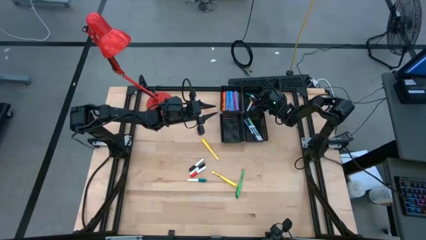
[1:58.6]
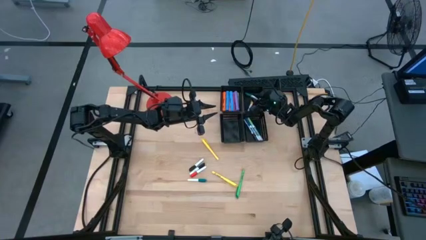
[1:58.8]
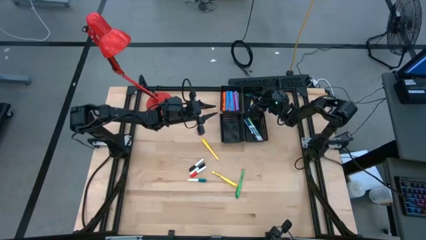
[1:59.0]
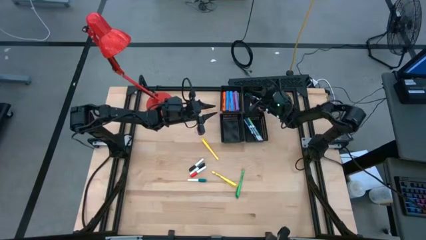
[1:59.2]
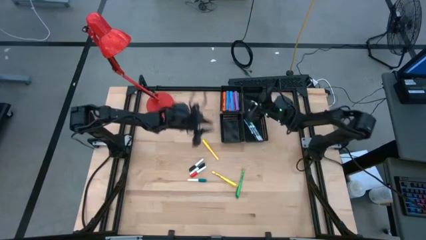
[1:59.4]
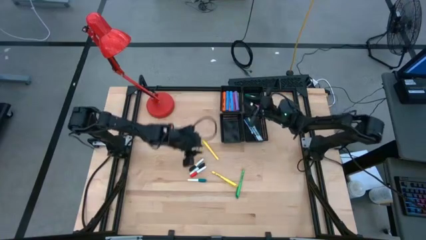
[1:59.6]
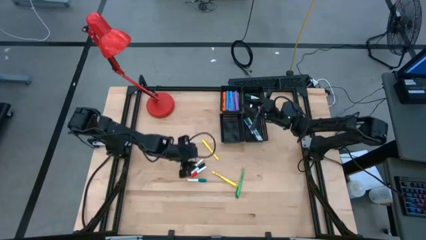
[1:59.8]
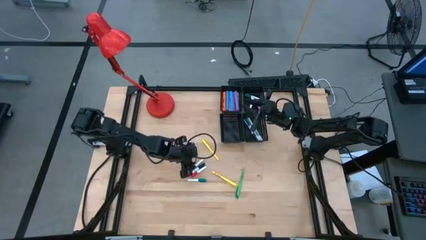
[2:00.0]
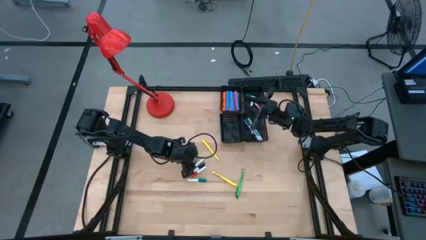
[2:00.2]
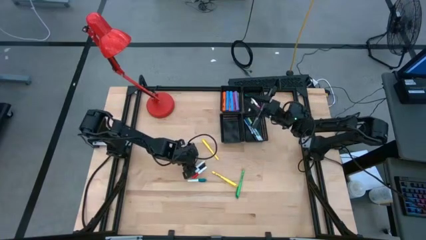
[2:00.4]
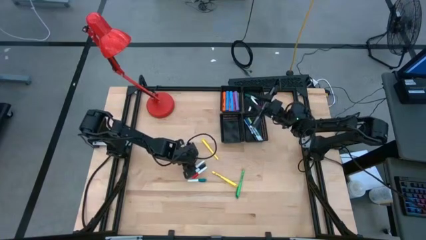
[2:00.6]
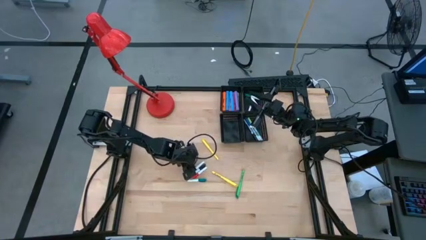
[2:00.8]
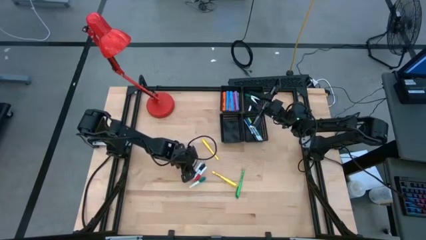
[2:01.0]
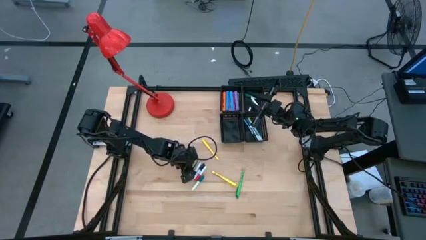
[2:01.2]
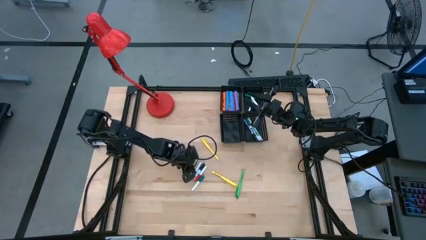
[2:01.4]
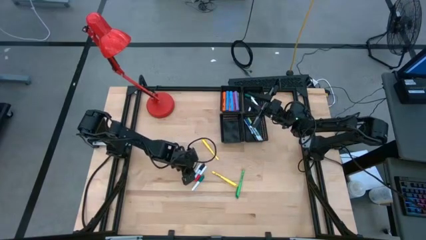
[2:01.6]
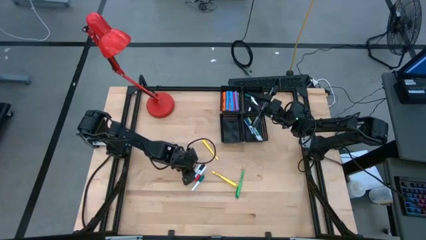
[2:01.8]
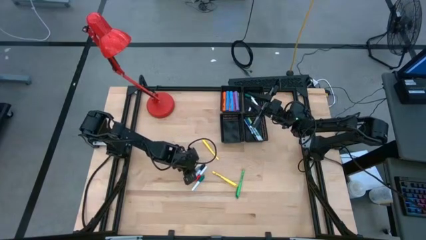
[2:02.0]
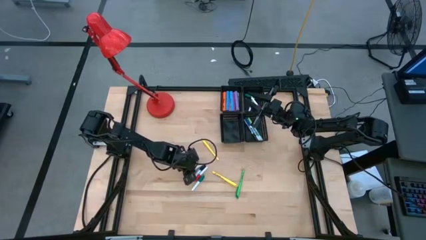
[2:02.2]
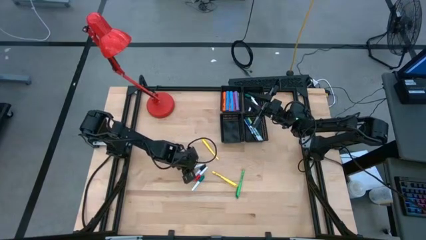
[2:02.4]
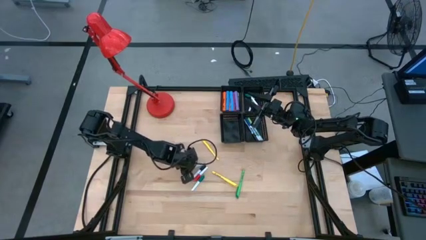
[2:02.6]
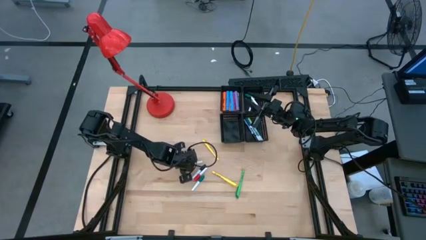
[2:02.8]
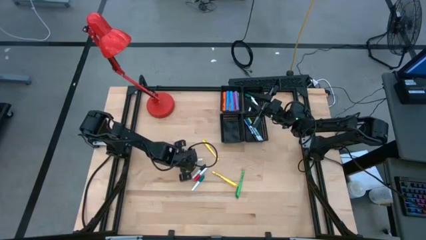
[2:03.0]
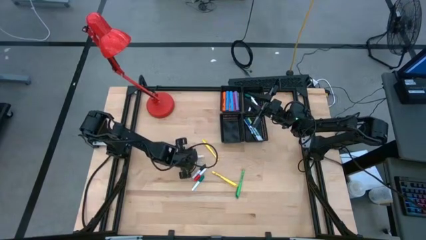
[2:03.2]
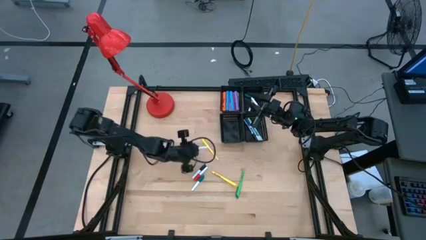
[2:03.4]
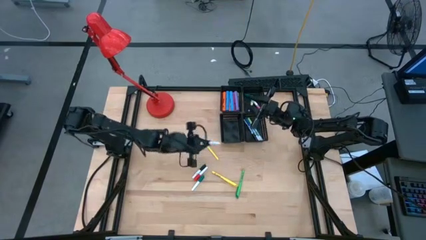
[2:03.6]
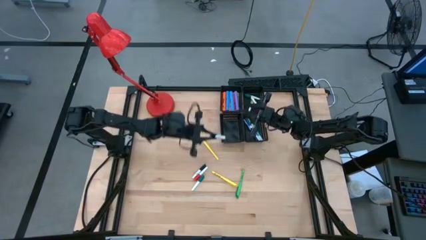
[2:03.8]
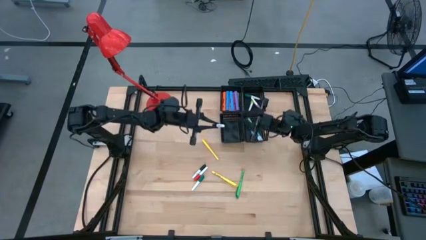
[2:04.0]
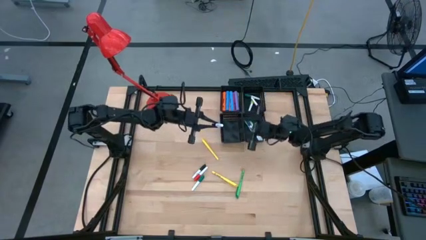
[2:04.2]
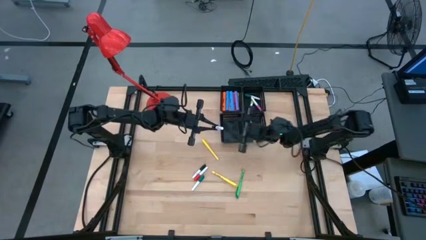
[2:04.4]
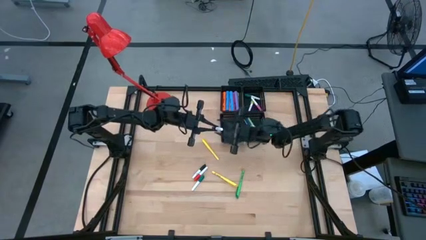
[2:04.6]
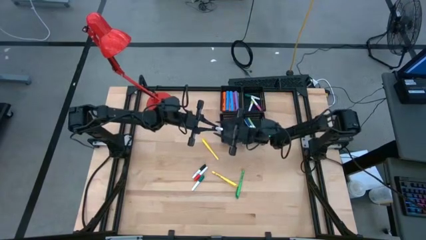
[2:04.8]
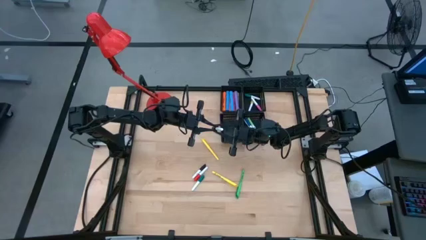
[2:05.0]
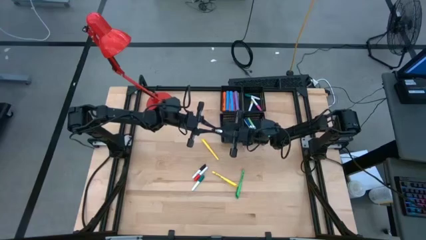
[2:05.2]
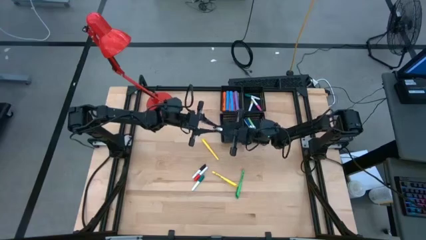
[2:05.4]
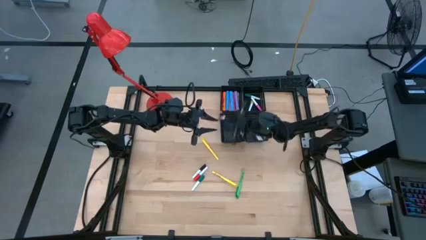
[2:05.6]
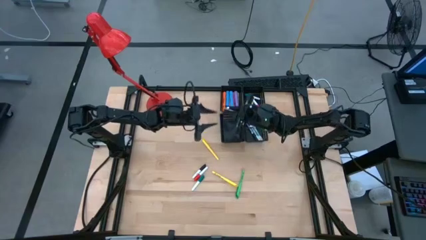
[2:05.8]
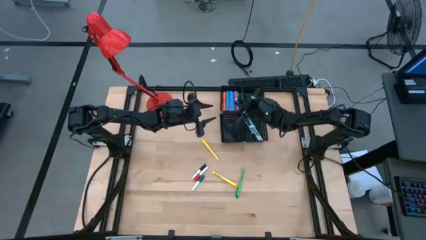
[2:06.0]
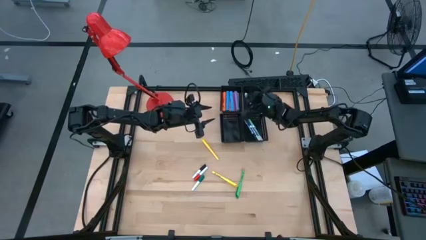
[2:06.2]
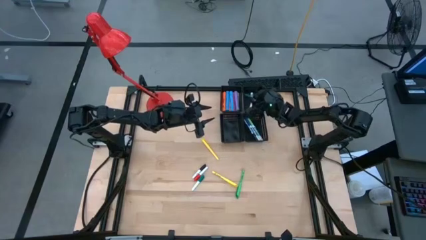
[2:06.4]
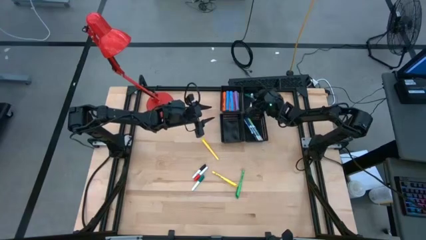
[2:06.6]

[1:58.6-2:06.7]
Task: Pick & Place Markers
Put the black and white highlighter pen into the top right black bin

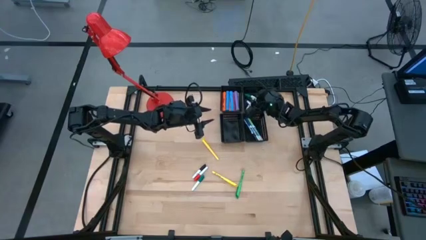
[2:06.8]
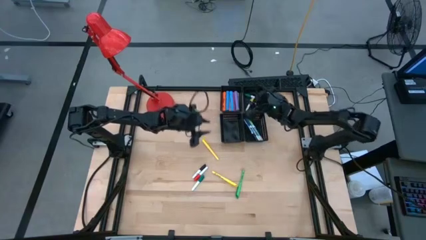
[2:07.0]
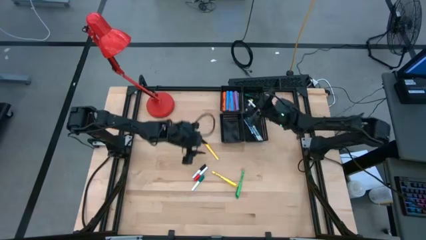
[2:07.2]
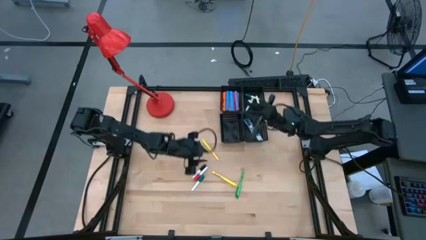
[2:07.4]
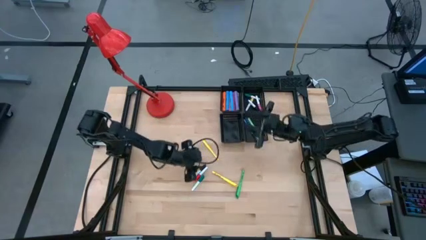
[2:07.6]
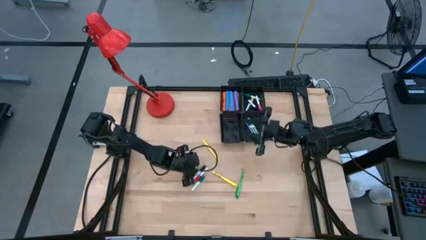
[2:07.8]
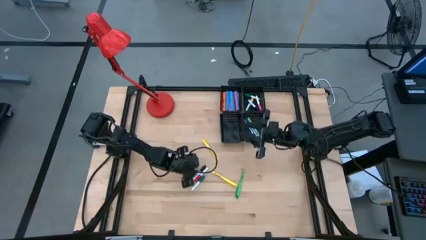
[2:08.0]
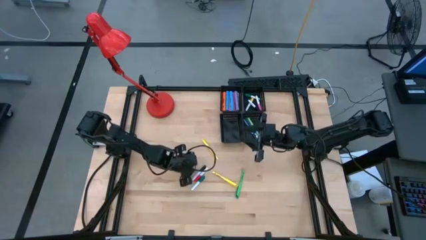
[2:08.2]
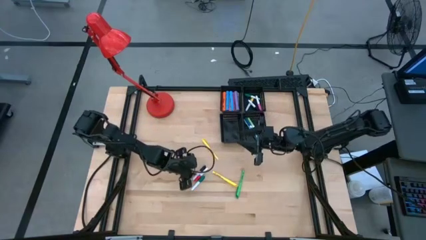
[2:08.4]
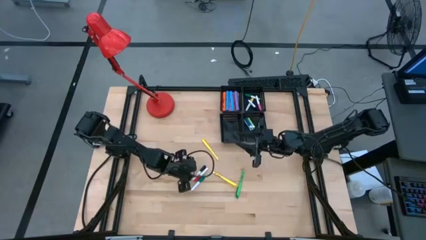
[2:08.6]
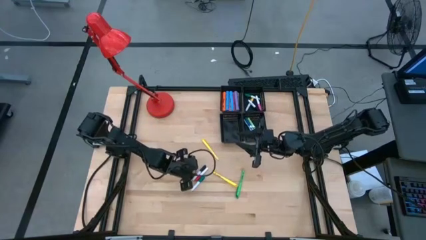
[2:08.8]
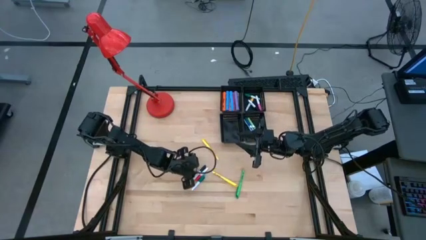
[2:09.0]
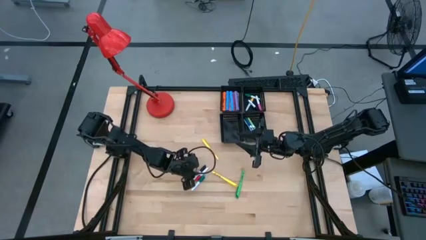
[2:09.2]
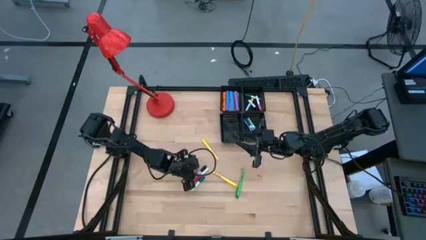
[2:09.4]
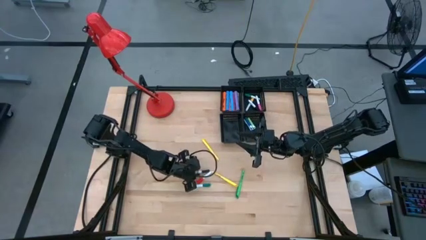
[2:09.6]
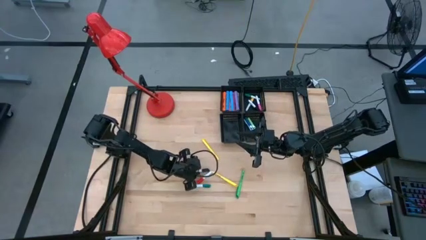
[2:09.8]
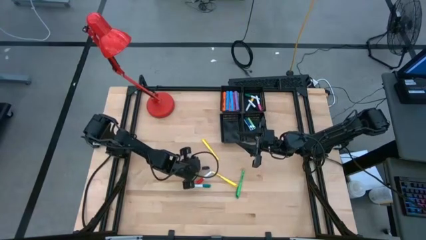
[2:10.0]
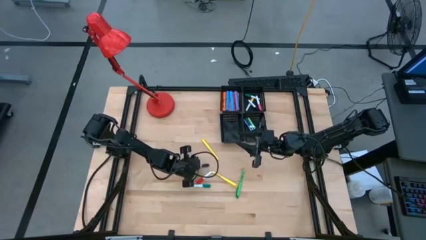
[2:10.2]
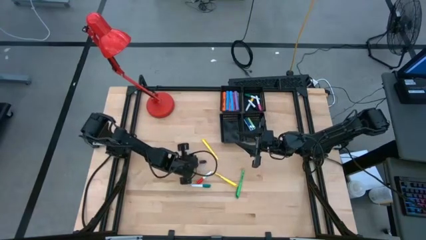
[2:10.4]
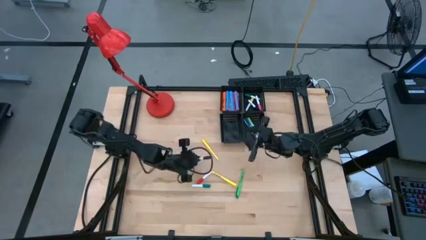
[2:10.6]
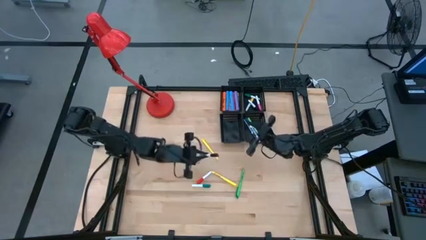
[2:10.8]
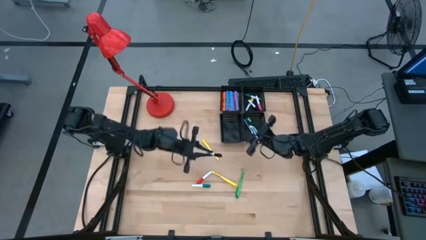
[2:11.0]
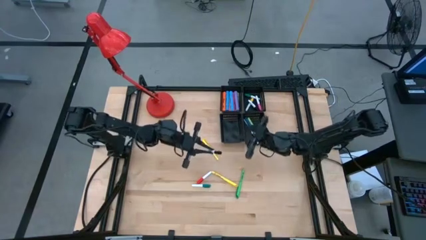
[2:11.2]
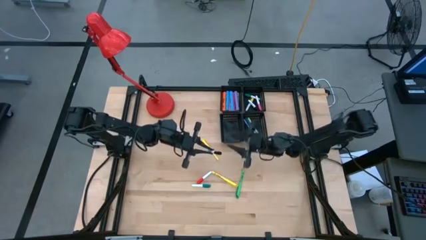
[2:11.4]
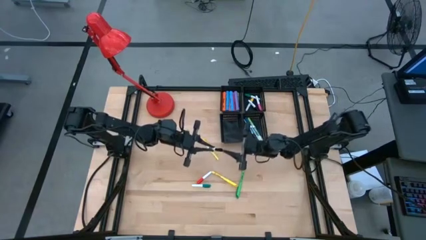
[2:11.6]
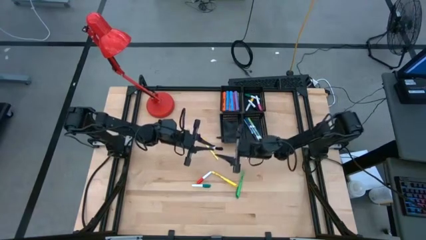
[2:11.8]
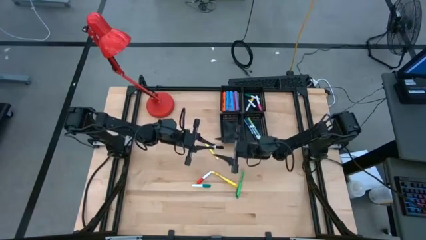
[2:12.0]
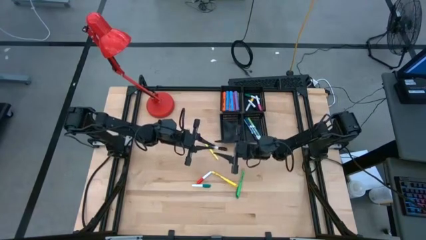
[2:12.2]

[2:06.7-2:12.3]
Put the black and white highlighter pen into the top right black bin

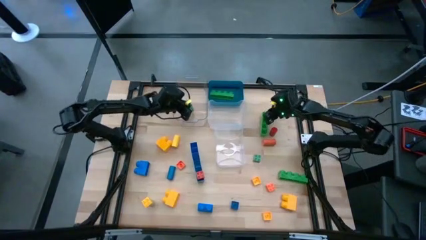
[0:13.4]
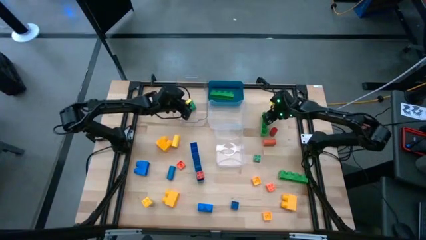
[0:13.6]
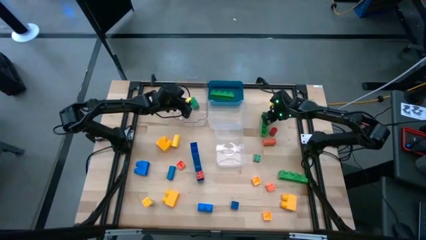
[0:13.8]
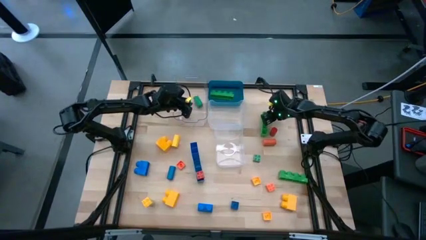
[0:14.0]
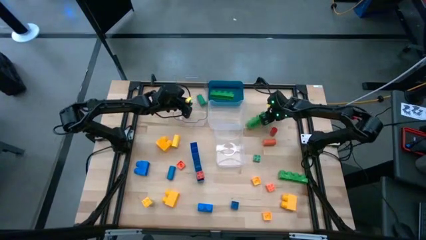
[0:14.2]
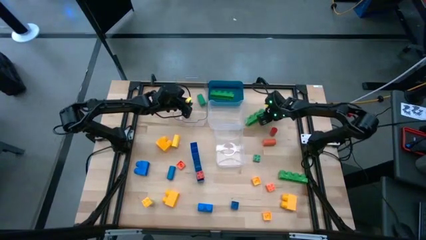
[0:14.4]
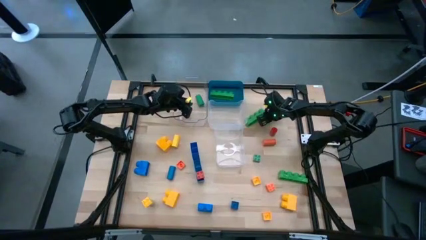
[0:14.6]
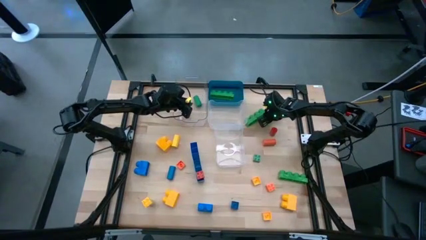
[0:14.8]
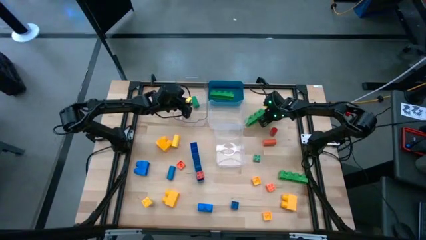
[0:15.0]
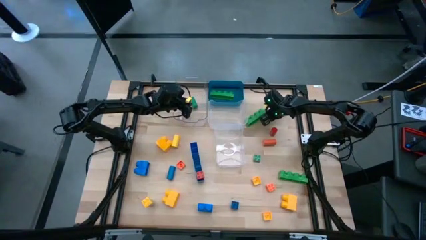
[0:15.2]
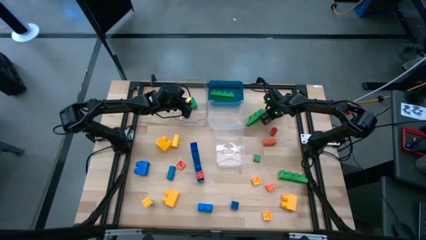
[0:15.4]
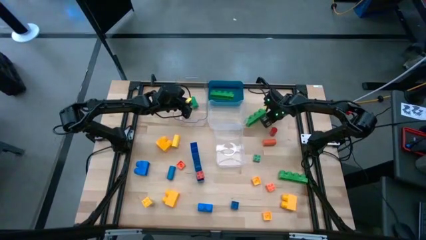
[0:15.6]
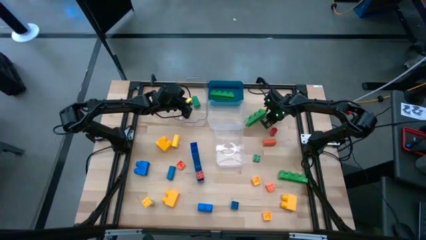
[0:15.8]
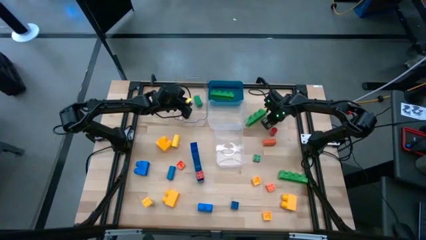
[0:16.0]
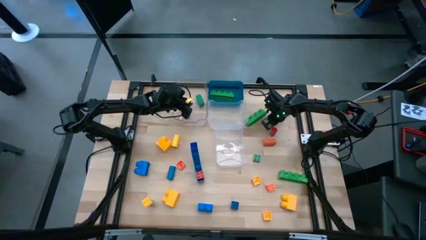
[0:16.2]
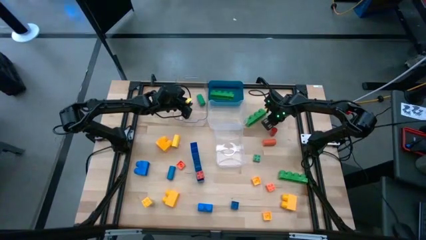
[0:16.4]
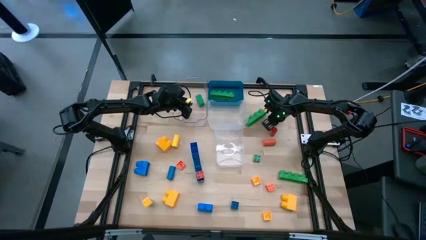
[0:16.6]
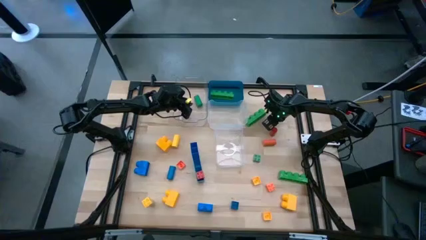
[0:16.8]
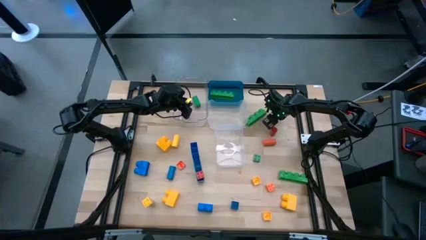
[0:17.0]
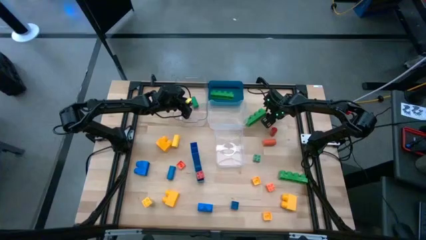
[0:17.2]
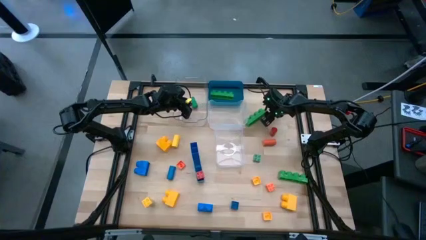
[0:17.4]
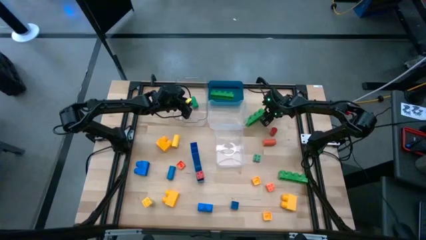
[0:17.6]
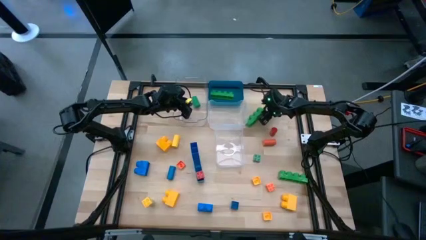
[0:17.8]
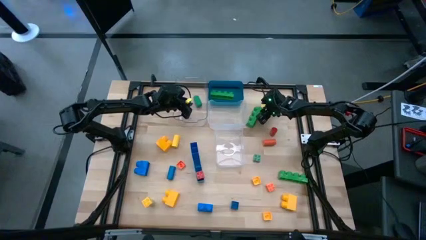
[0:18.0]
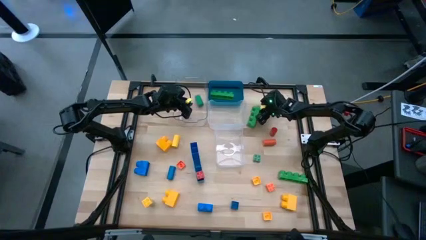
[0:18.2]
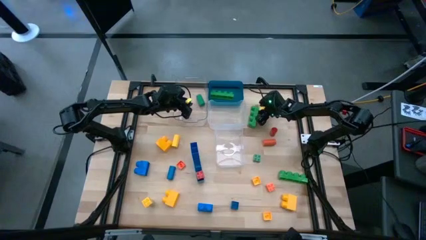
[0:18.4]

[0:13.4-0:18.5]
Task: Sort blocks by size
Put the green 4 stud large game piece into the blue bin
